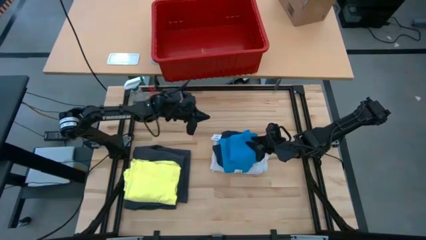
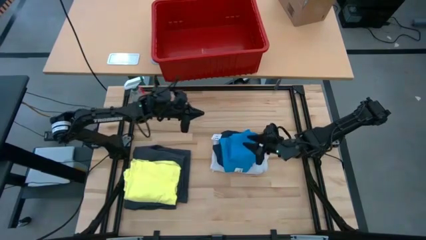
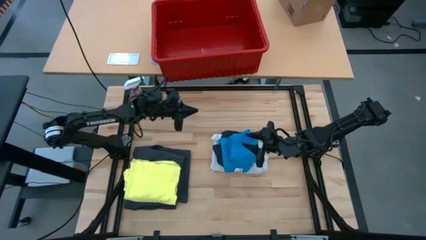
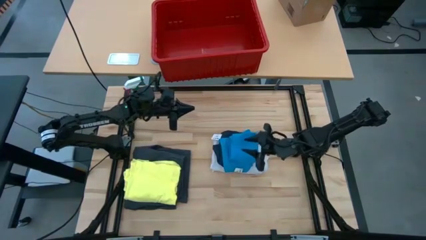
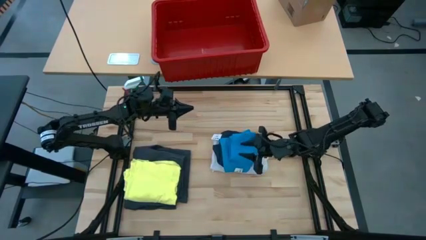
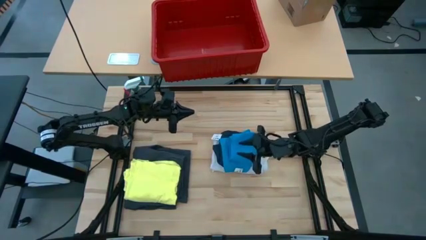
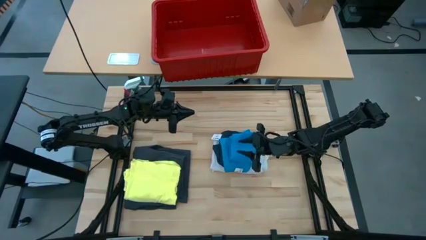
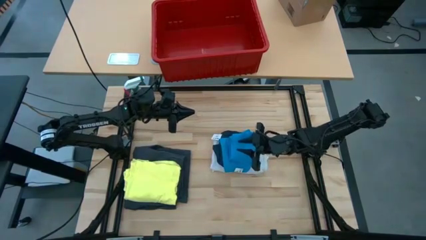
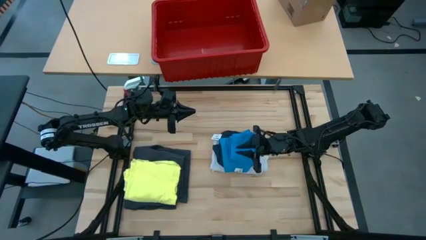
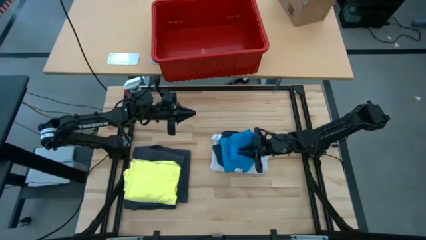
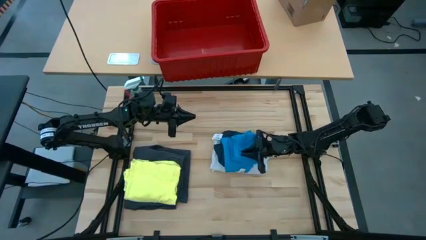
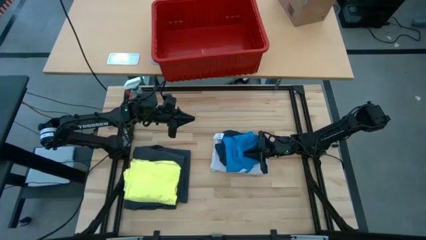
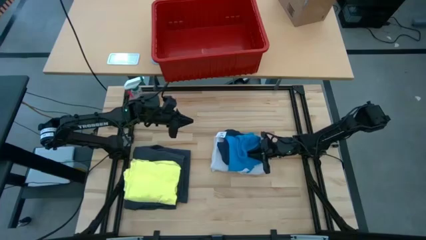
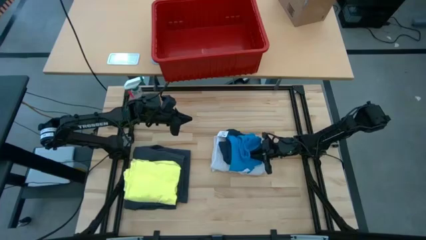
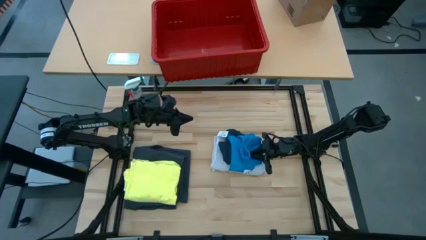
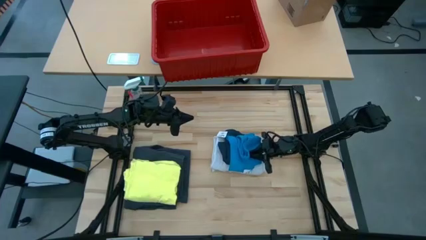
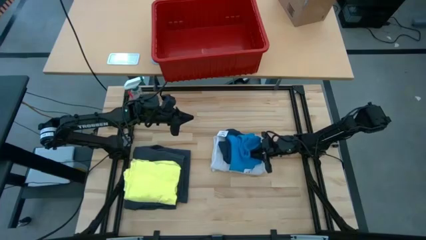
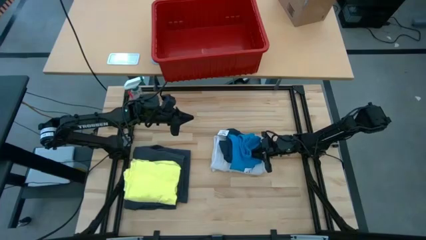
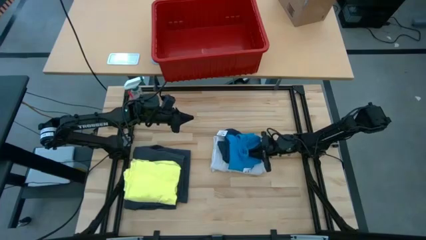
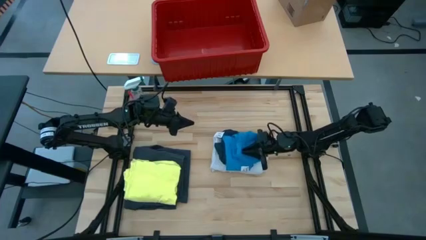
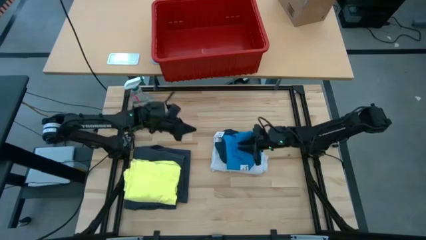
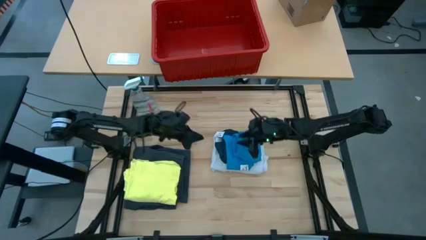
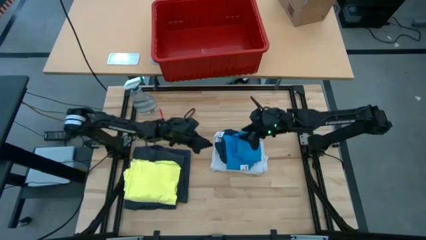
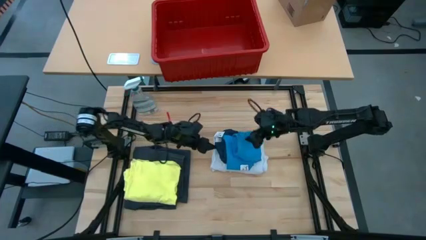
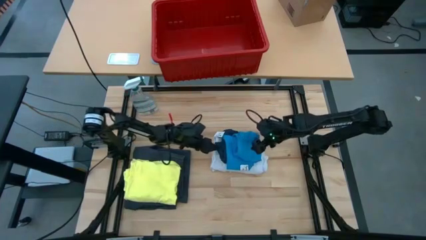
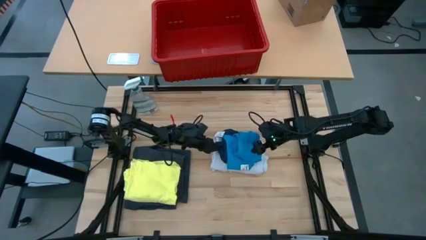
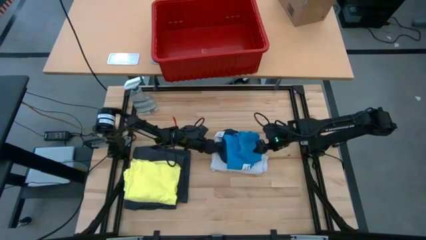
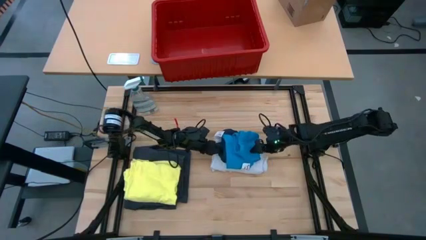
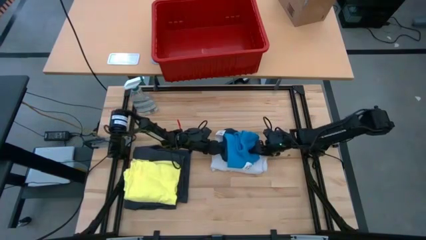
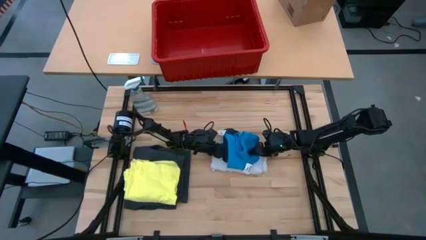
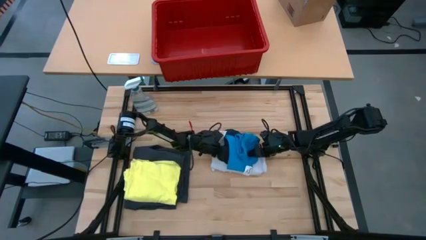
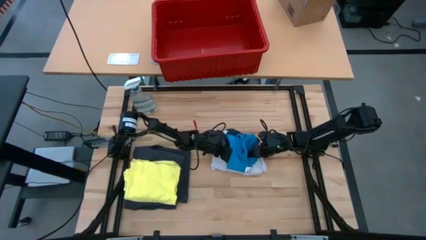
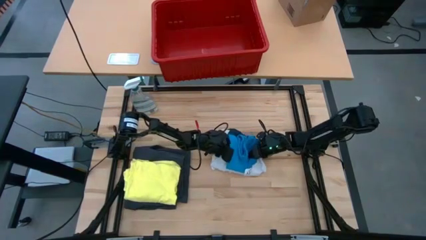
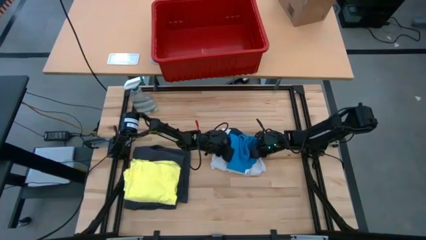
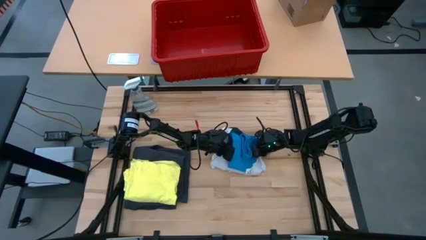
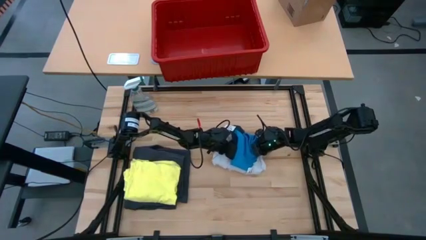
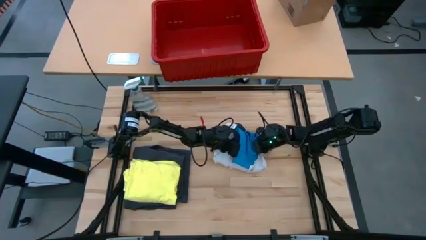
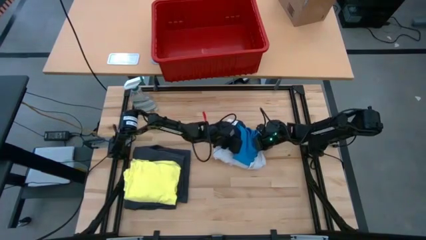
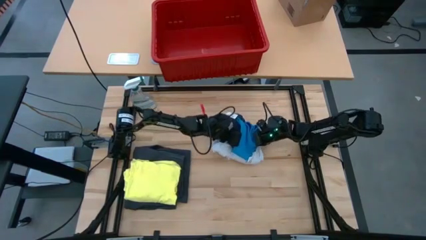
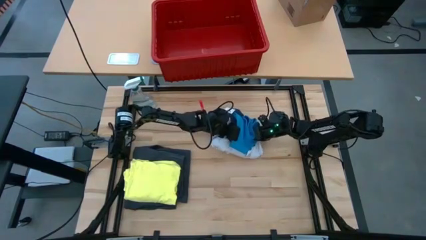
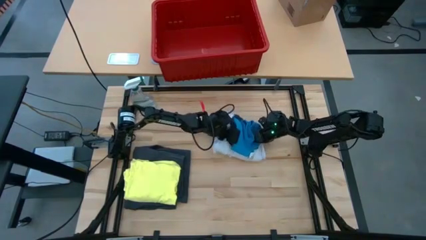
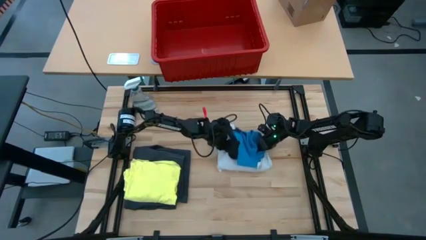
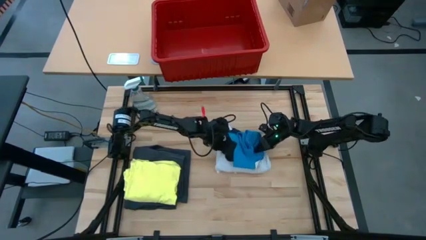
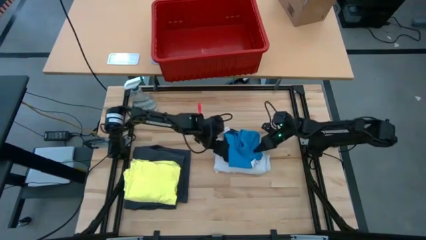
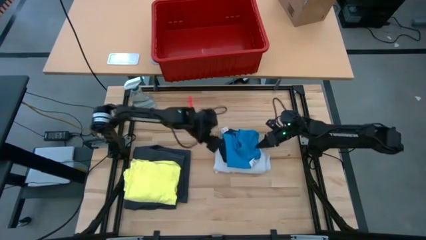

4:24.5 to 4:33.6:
Task: Fold Laundry from Bin
Put the stacked clothes into the red laundry bin

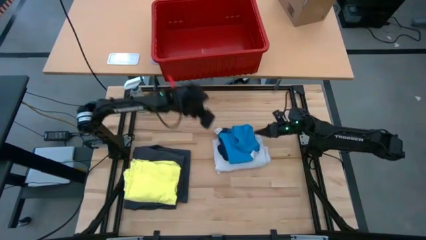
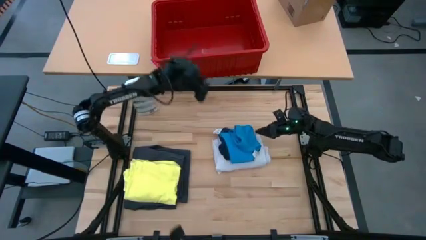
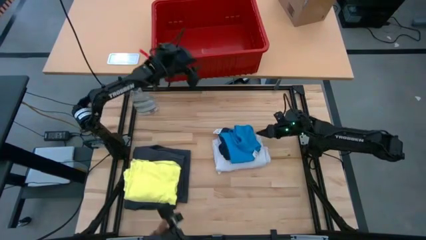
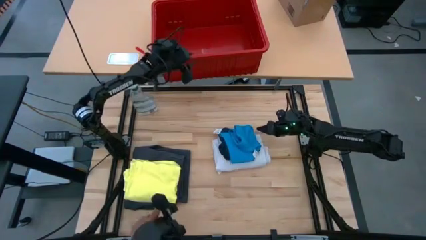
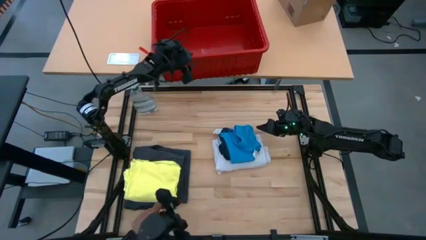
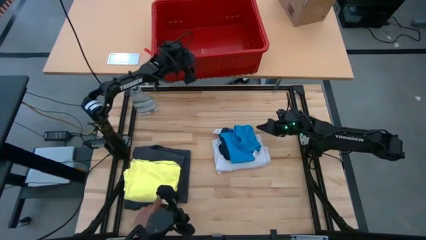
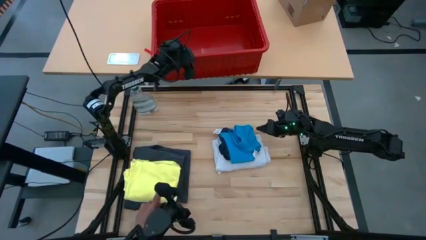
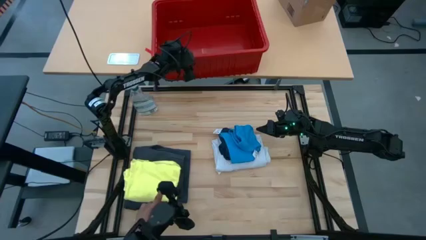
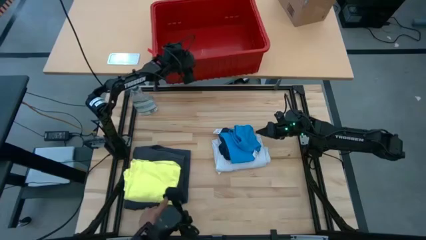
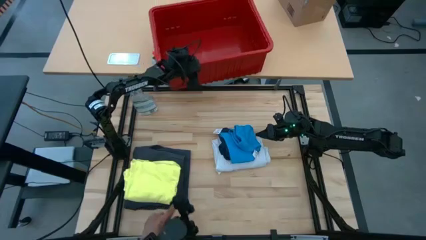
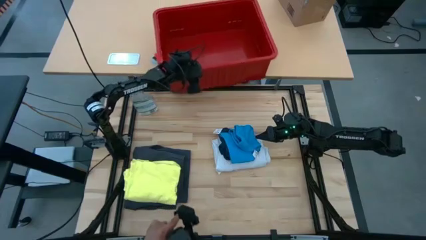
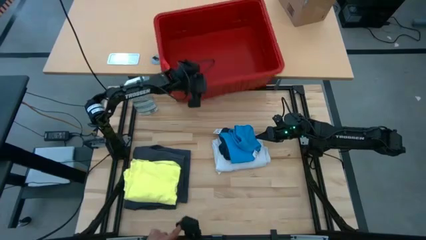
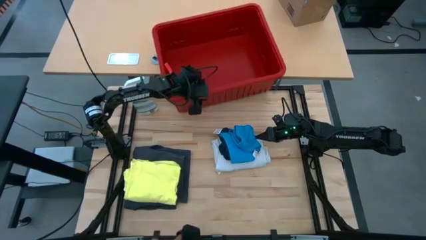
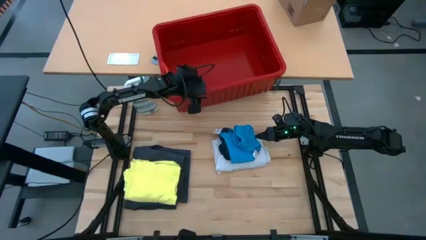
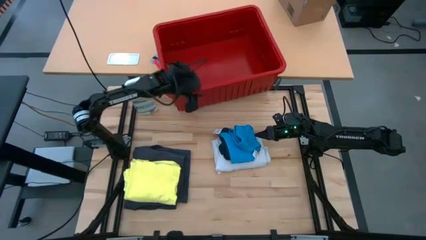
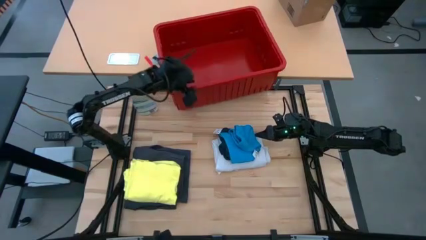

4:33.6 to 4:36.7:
Adjust the red laundry bin

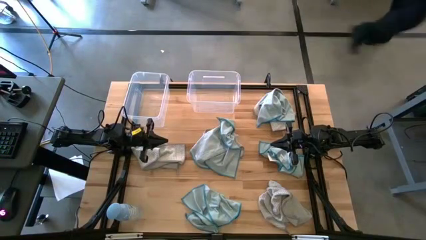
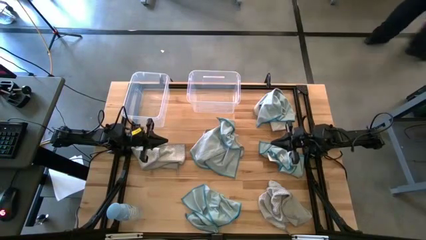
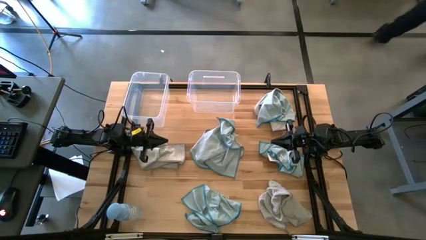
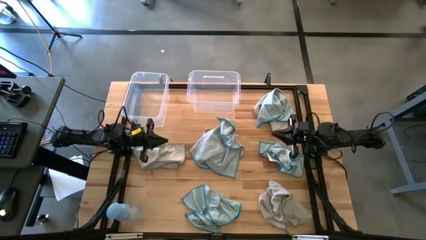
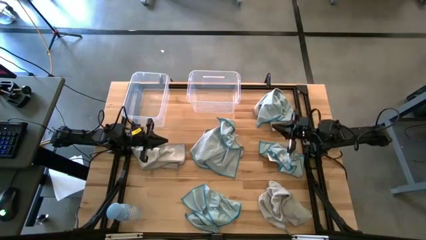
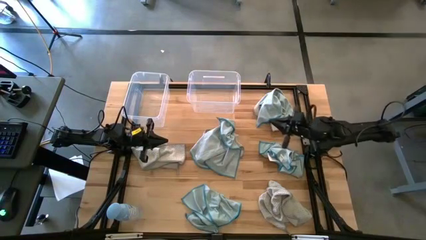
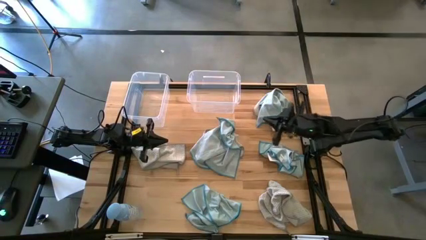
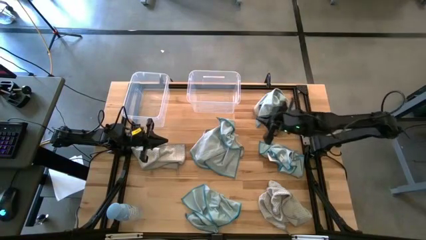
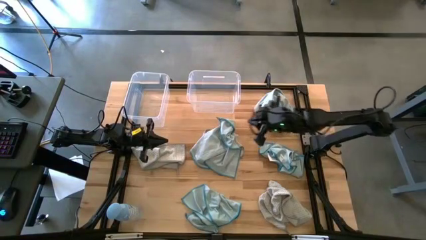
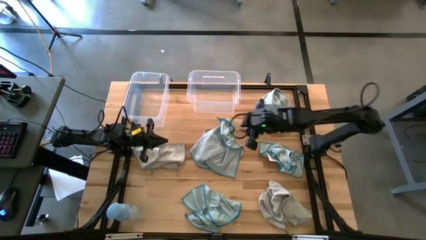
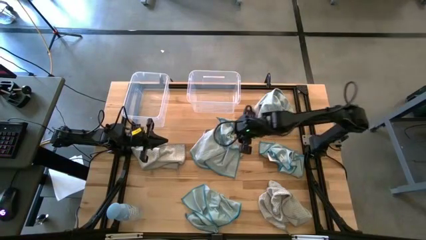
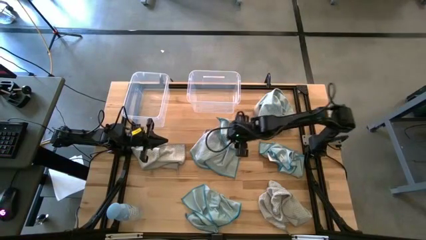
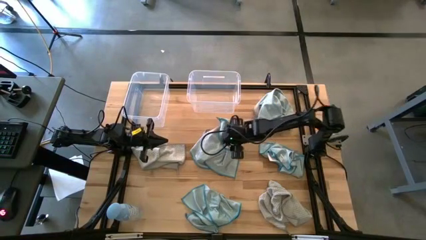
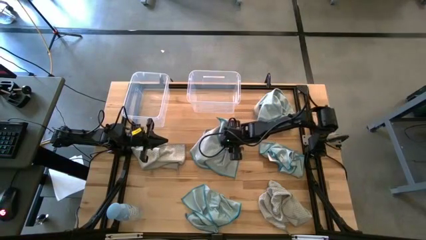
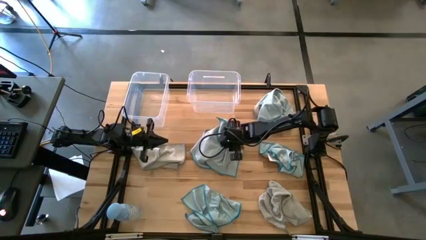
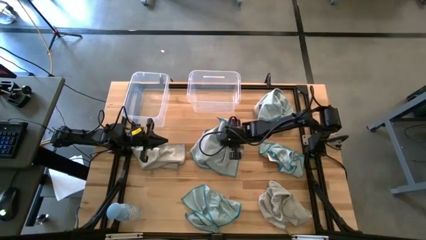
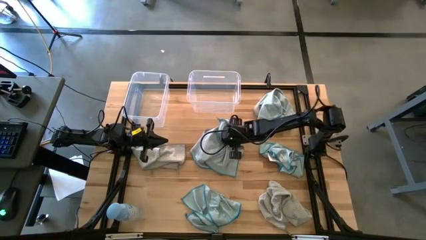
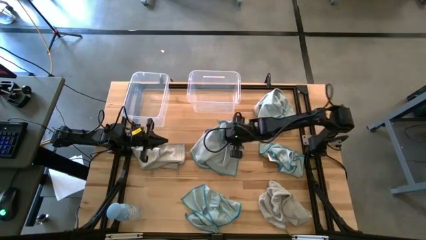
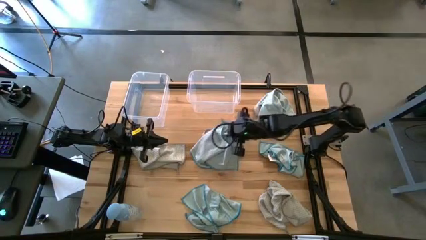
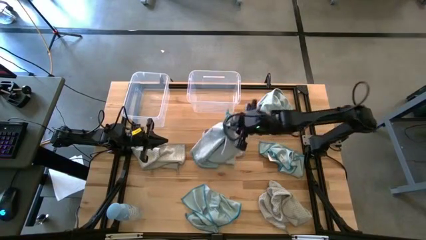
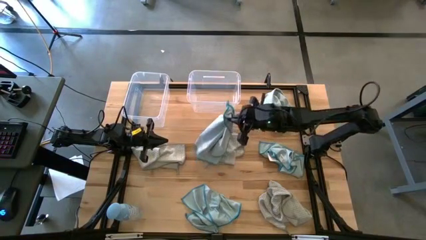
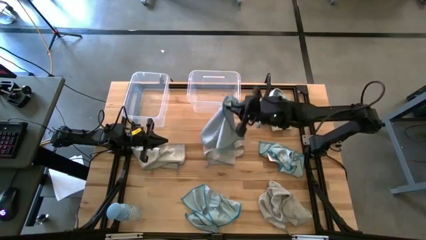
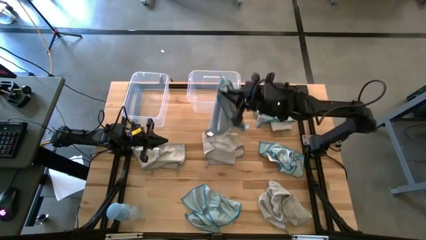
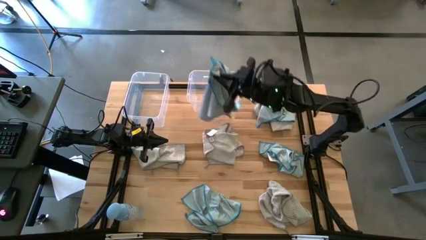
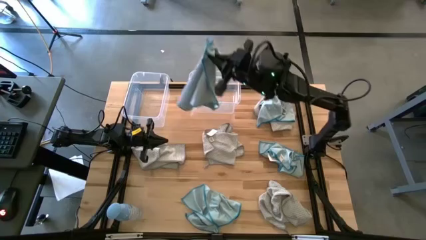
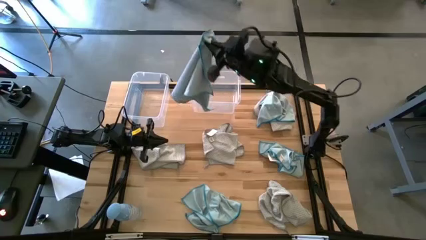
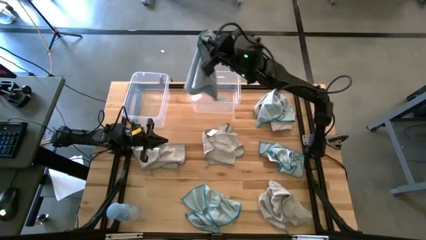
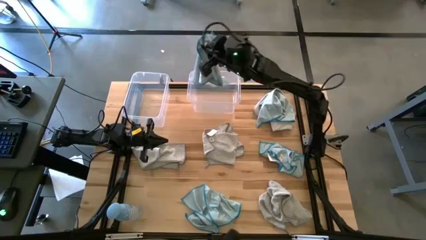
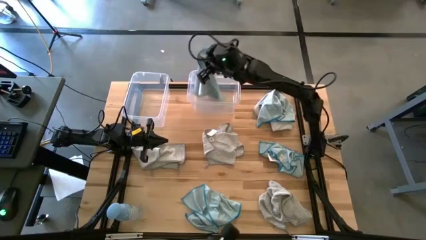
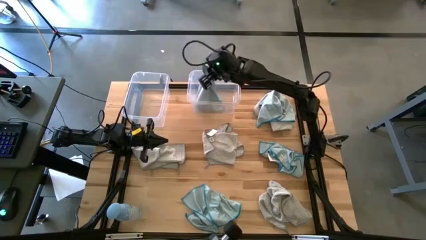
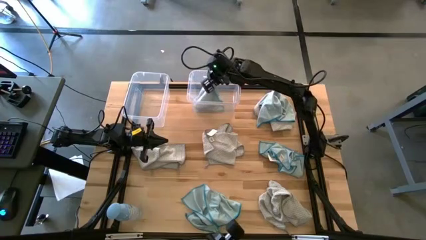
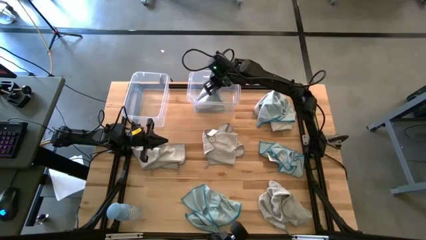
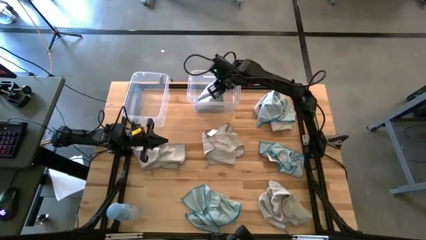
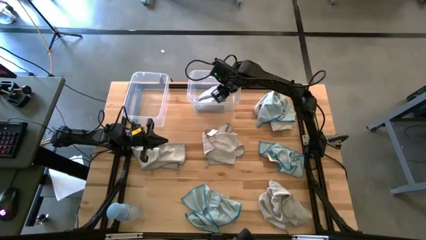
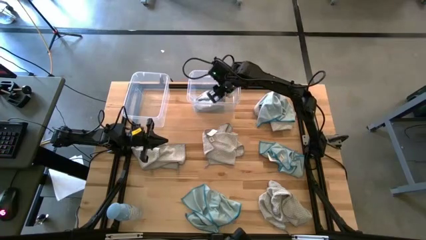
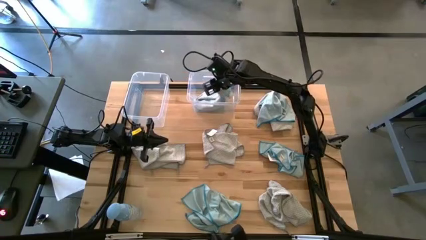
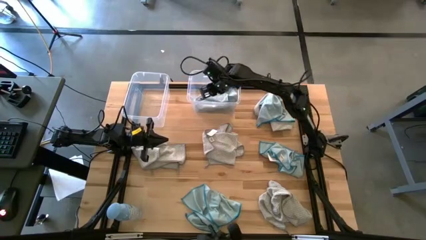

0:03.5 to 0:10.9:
Task: Sort microfiber towel by color & place in baskets
Put the center left blue microfiber cloth into the right transparent bin
